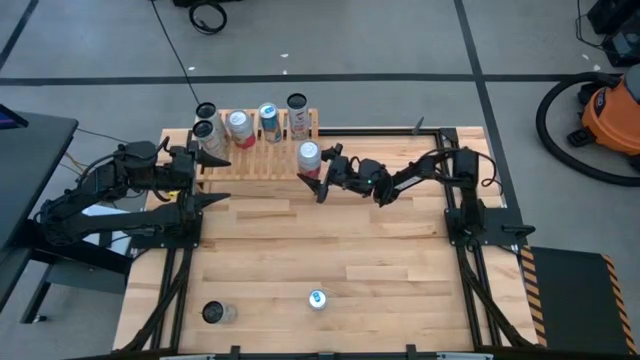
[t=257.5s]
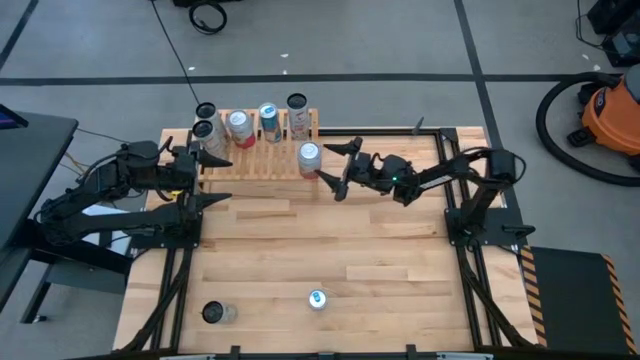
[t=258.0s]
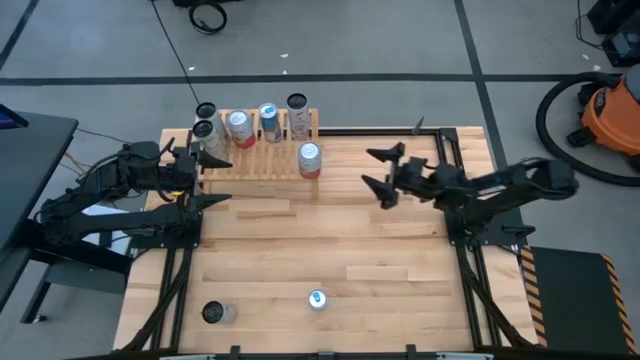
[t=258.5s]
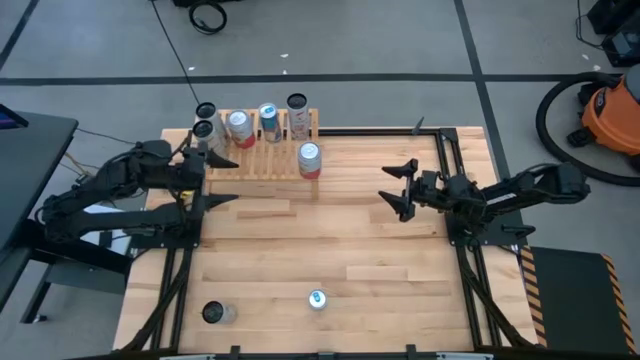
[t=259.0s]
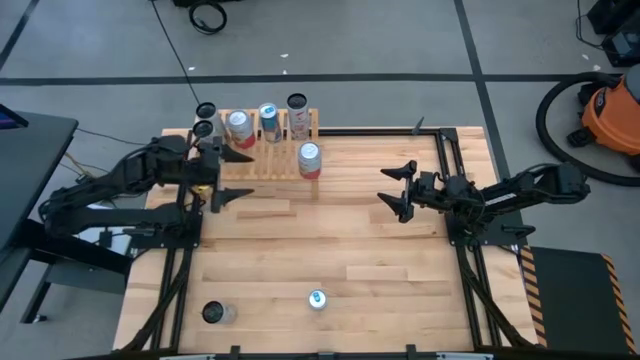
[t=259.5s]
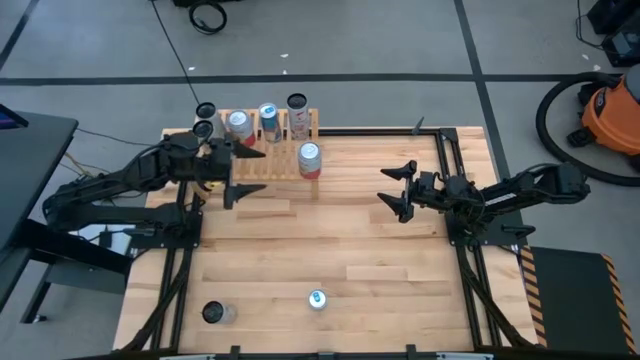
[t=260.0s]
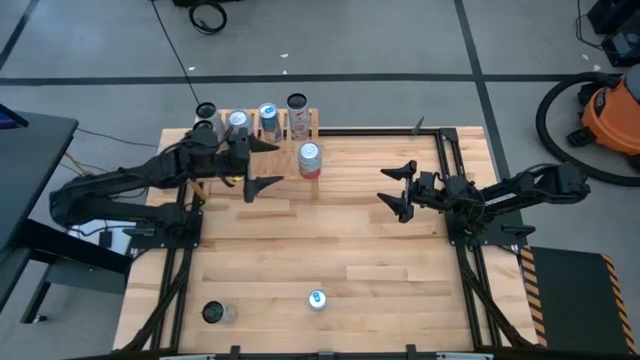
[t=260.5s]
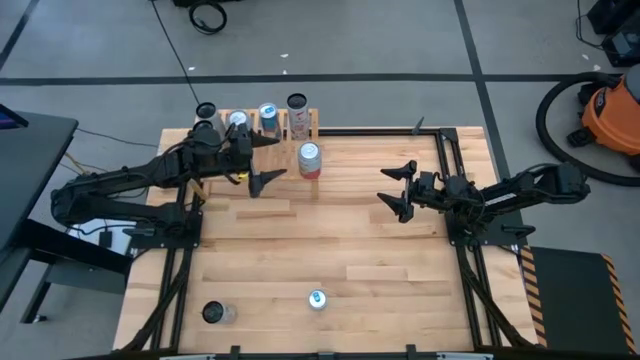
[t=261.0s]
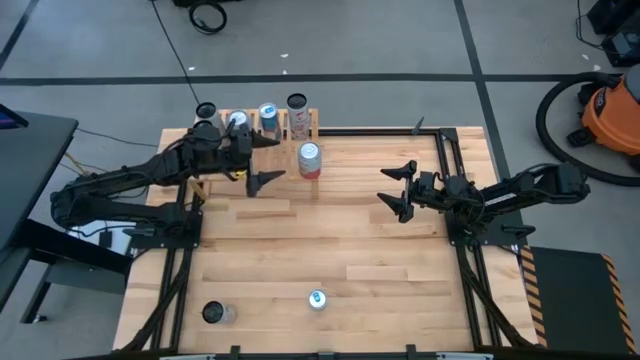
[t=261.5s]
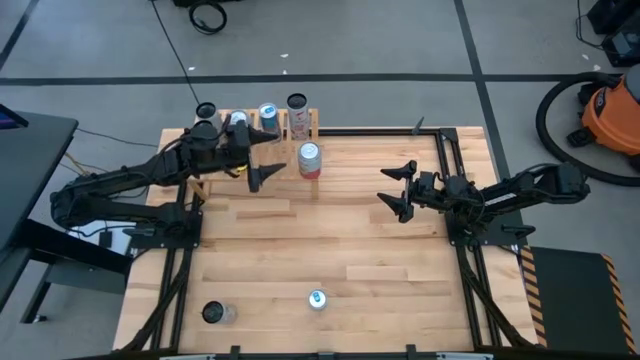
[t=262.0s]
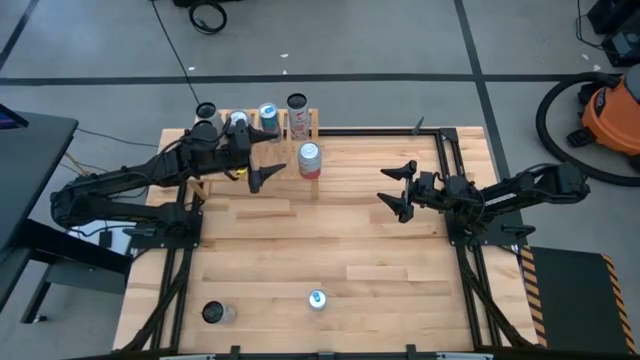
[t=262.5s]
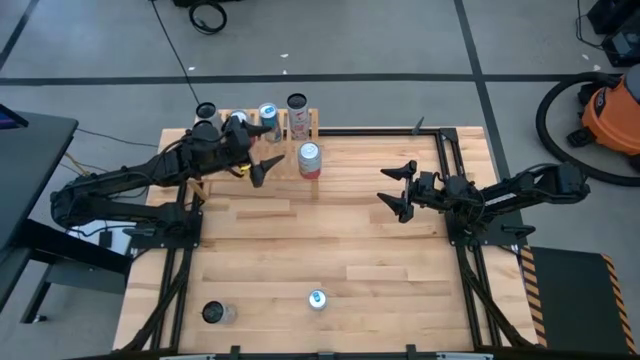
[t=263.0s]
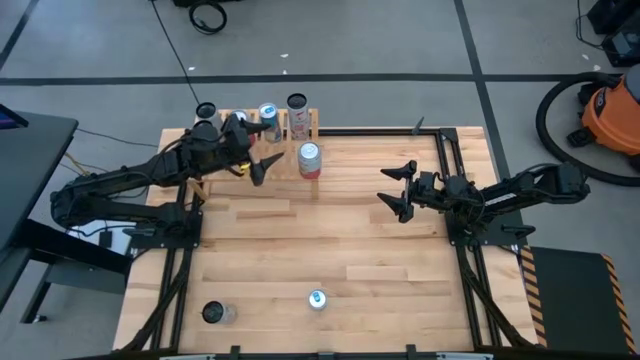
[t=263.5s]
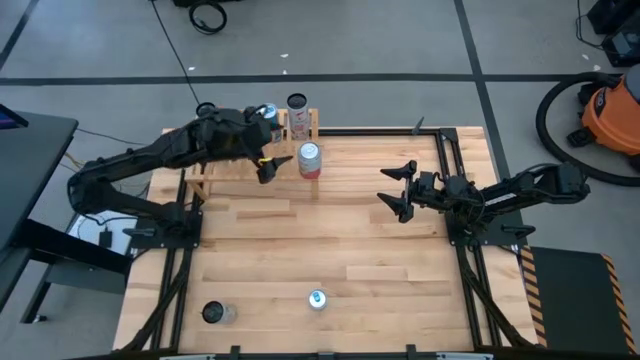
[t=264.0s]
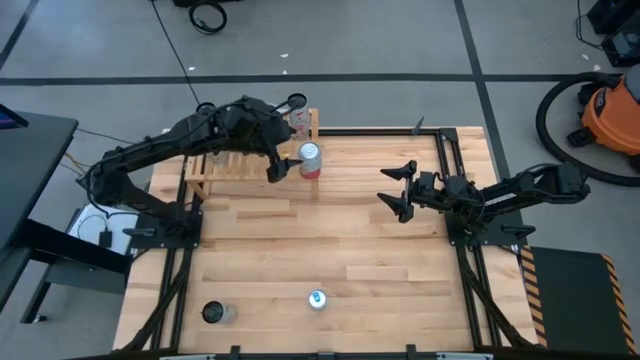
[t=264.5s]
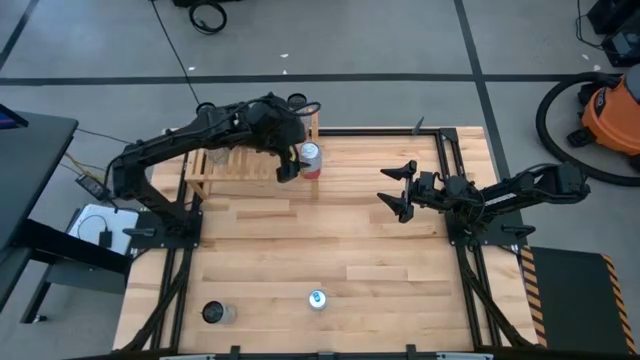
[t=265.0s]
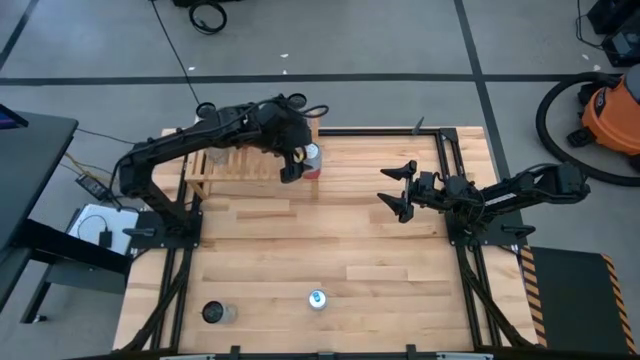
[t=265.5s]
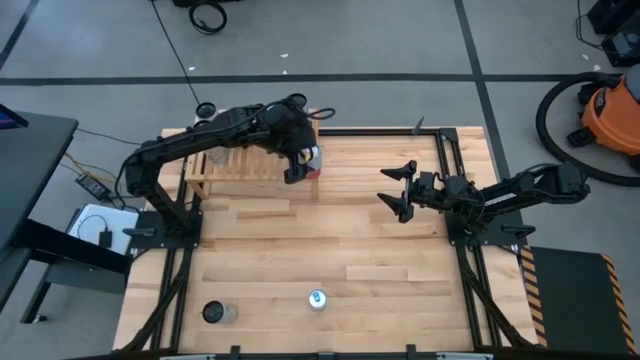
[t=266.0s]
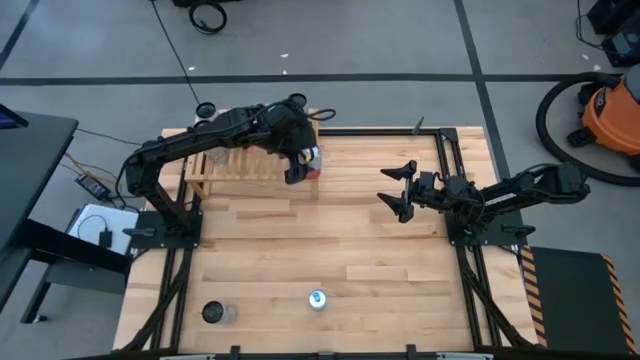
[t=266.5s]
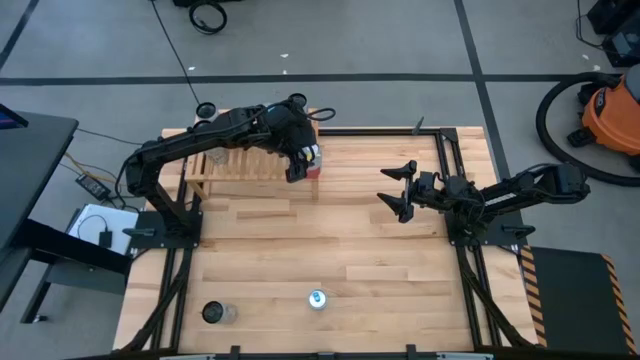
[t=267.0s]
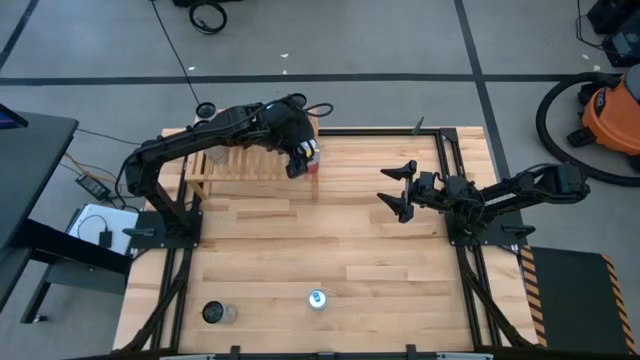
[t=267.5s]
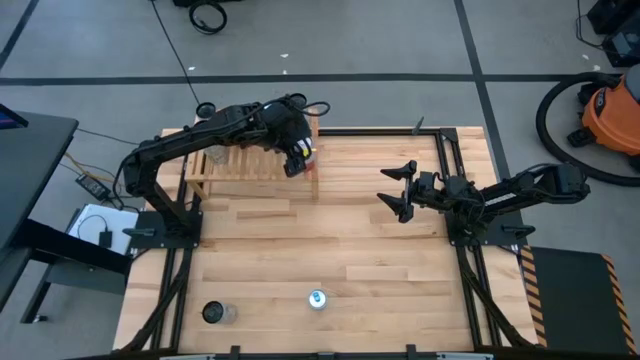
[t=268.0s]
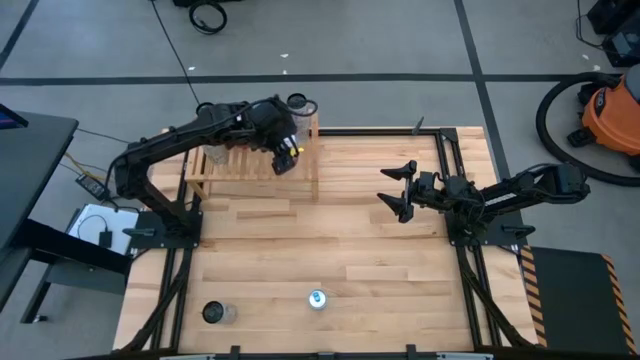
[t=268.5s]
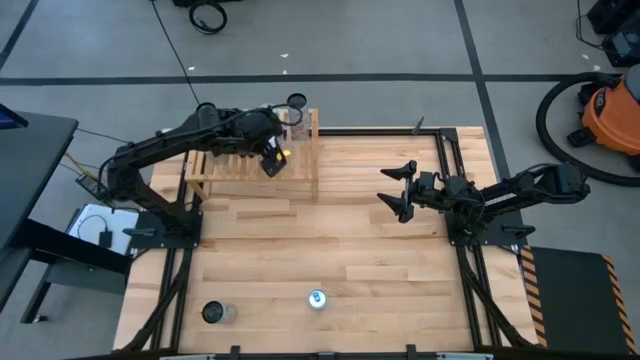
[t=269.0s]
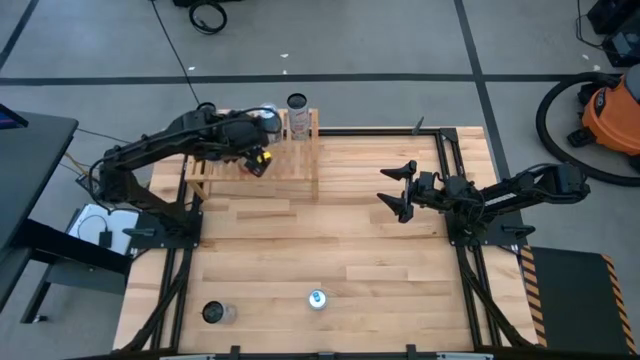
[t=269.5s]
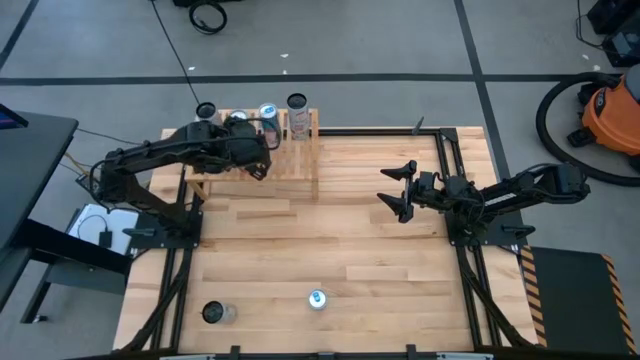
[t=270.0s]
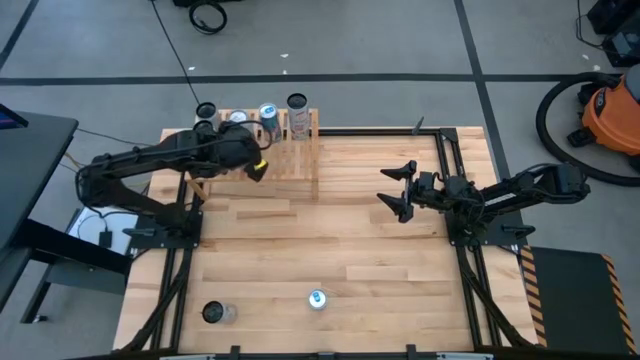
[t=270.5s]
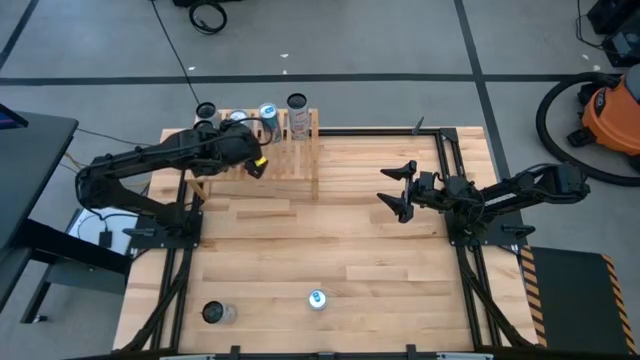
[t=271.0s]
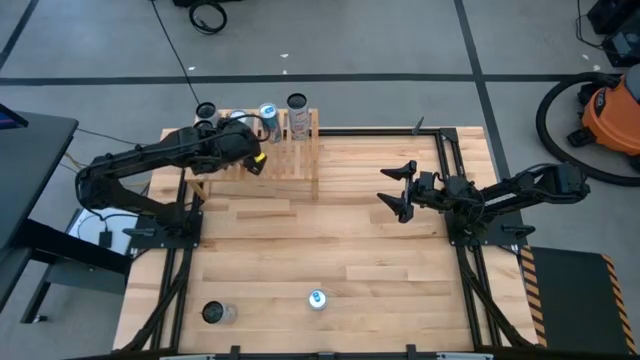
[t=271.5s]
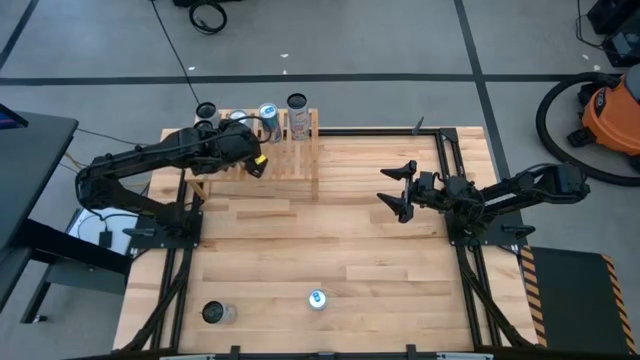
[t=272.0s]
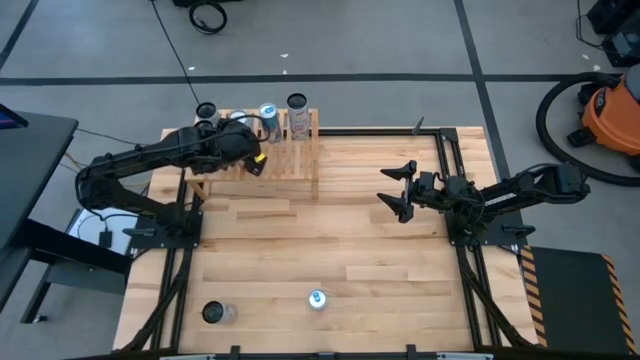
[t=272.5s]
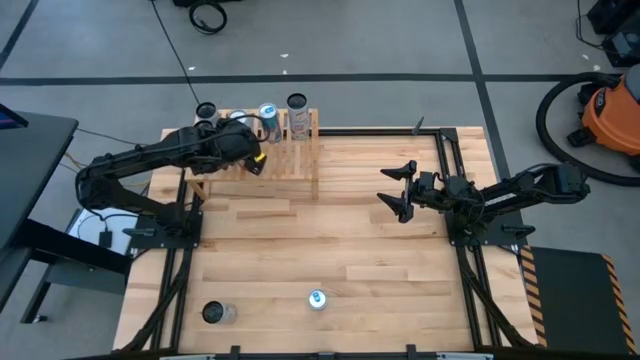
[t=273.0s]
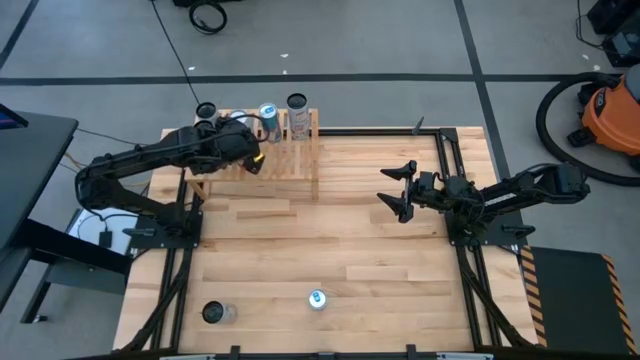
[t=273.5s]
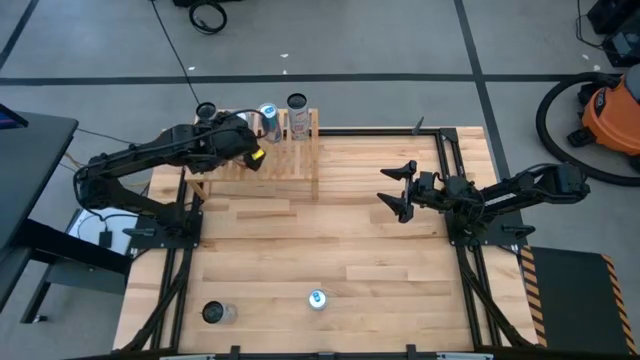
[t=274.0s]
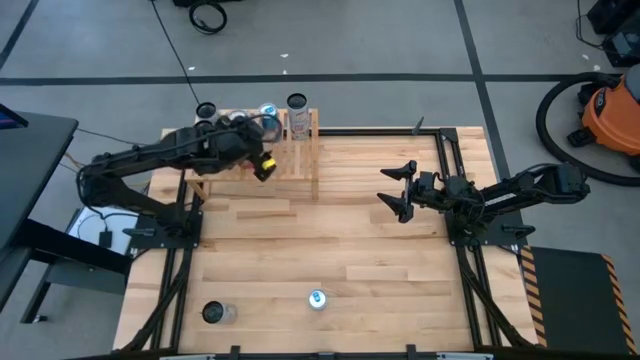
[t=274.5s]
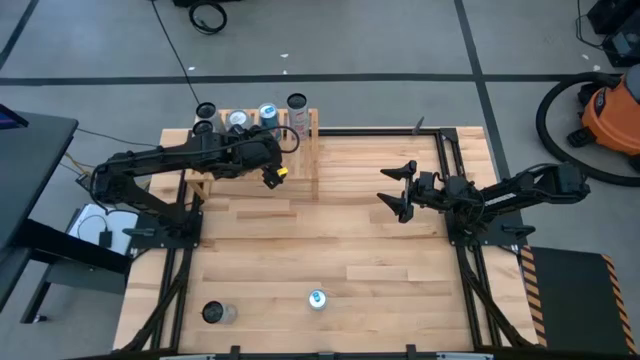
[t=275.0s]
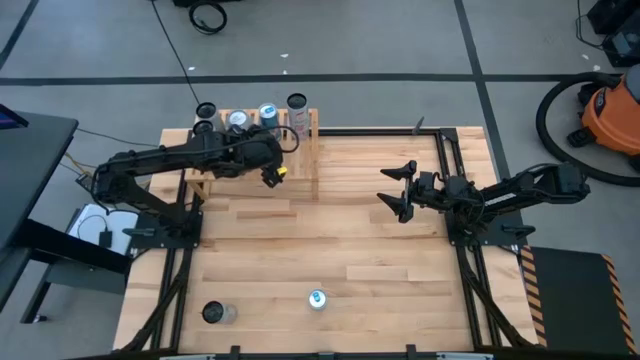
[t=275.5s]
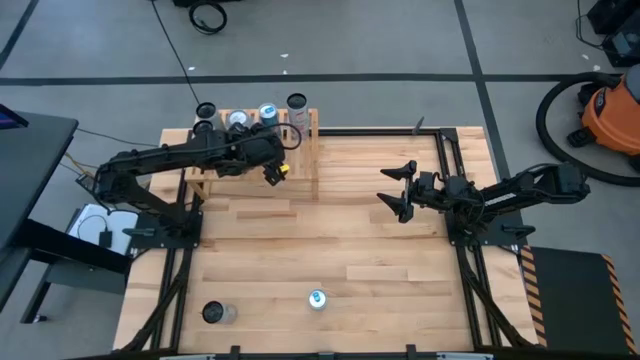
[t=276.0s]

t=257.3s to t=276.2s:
Task: Place canned beverage on shelf
Put the pink white soda can on the shelf aligned with the other pink white soda can

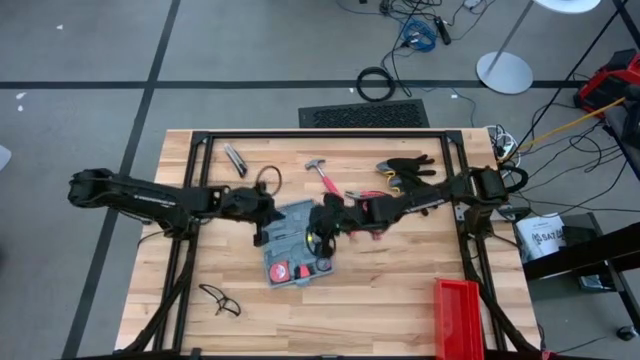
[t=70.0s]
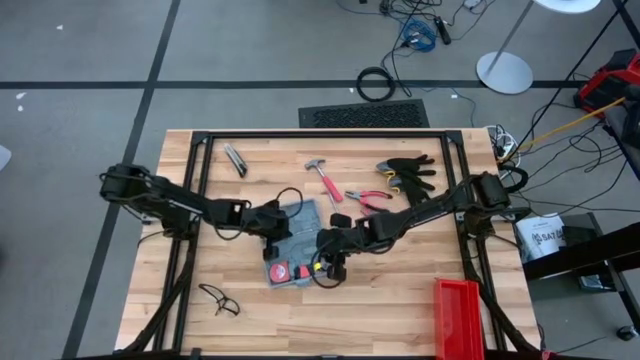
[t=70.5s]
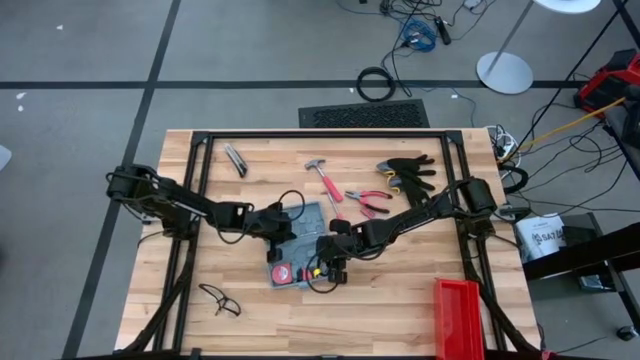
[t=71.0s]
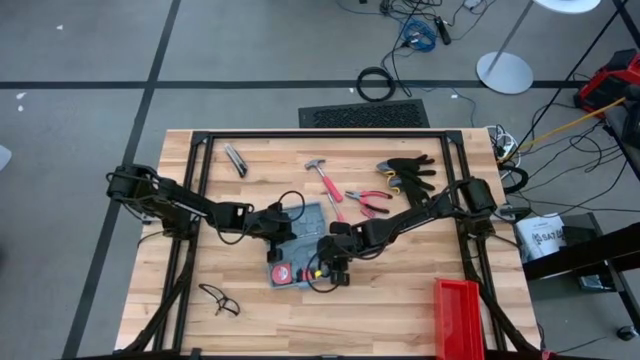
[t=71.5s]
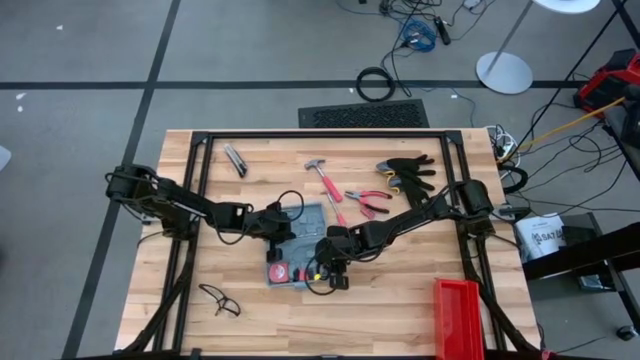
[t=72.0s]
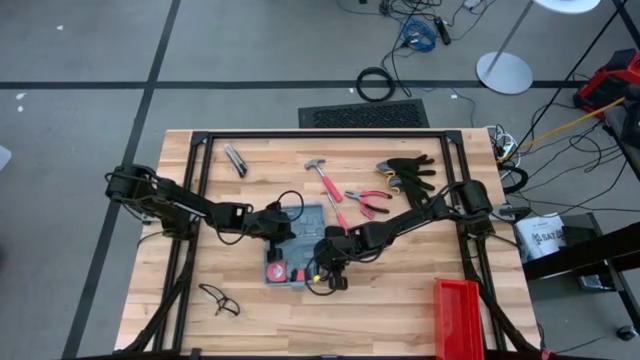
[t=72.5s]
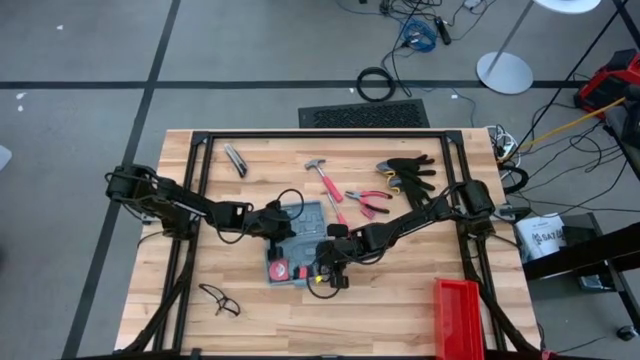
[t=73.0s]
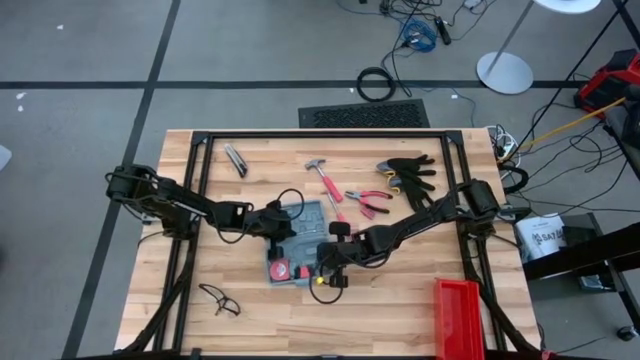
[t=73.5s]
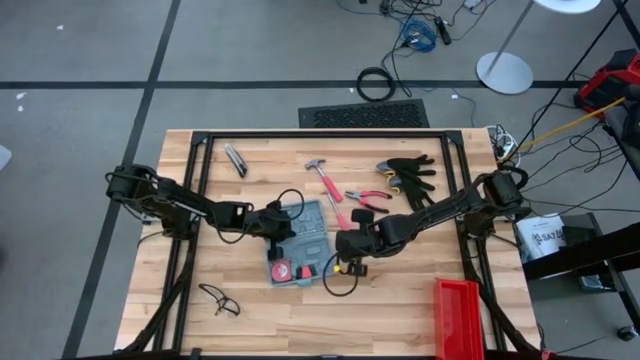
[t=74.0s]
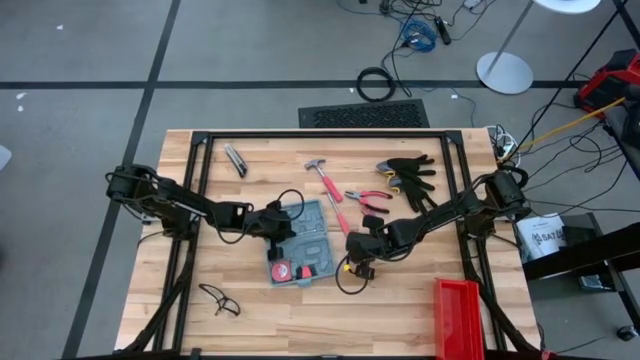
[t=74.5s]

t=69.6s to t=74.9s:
Task: prefit tool cases
Remove the pink electrical tape from the gray prefit tool case
